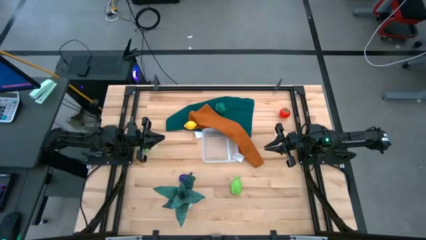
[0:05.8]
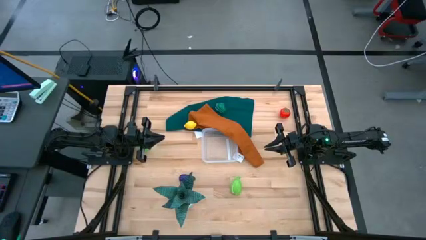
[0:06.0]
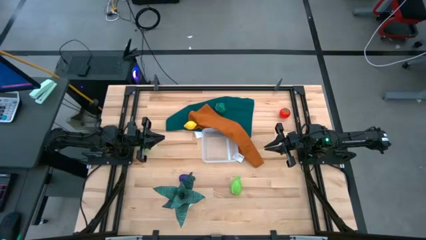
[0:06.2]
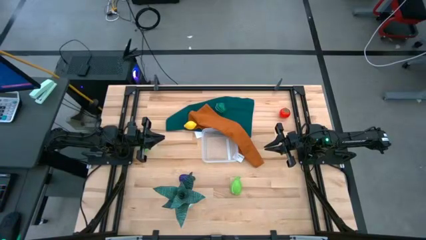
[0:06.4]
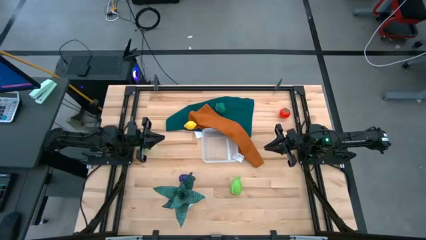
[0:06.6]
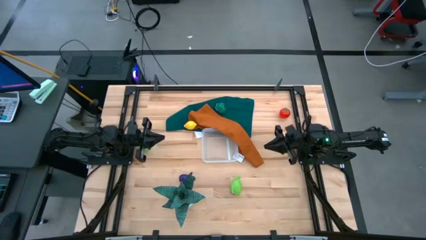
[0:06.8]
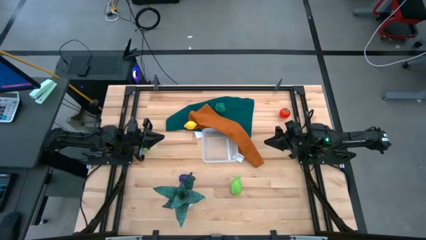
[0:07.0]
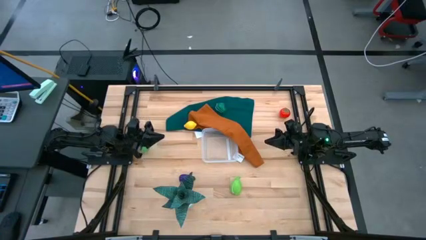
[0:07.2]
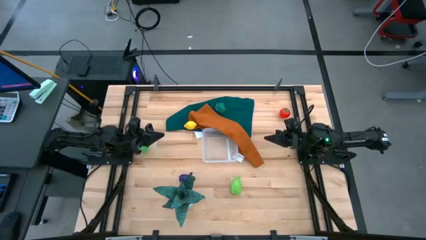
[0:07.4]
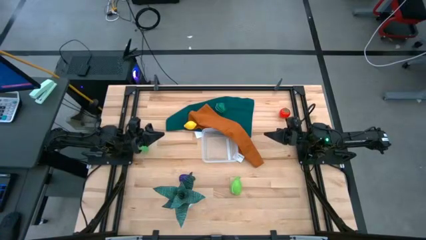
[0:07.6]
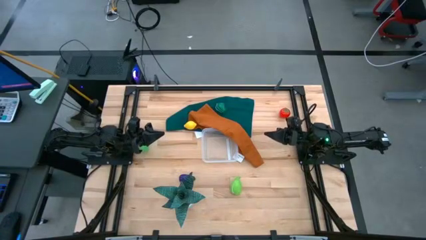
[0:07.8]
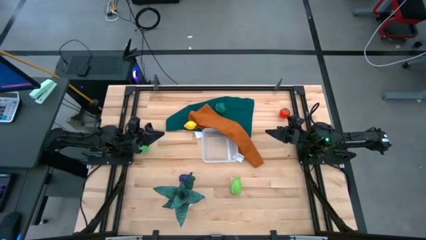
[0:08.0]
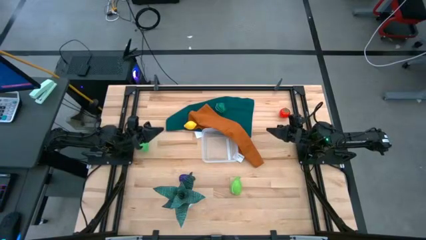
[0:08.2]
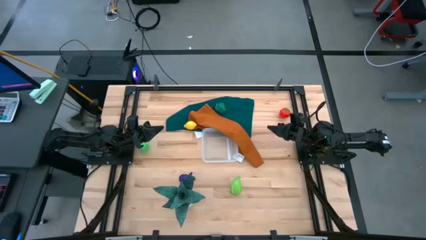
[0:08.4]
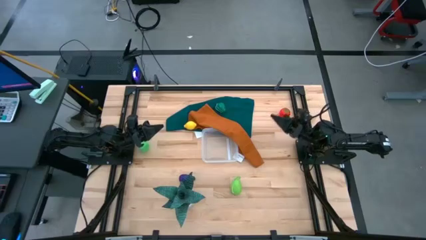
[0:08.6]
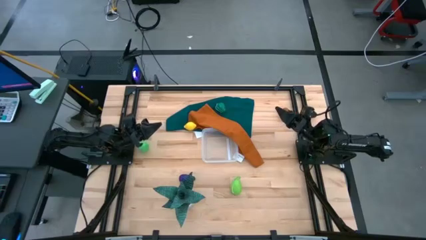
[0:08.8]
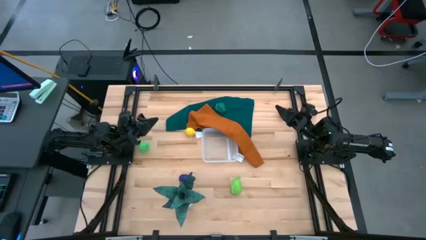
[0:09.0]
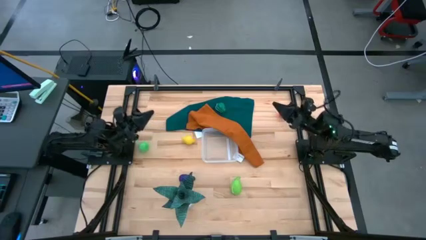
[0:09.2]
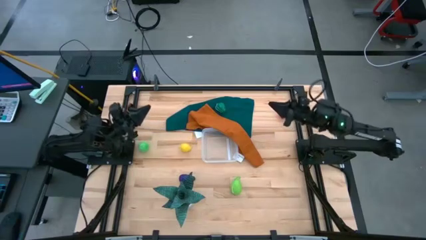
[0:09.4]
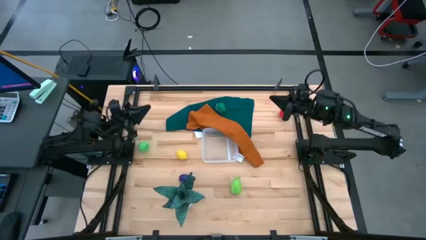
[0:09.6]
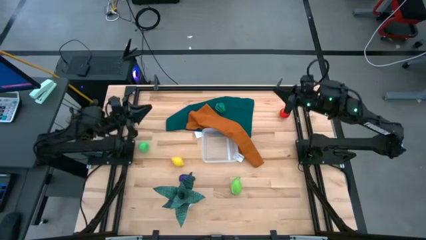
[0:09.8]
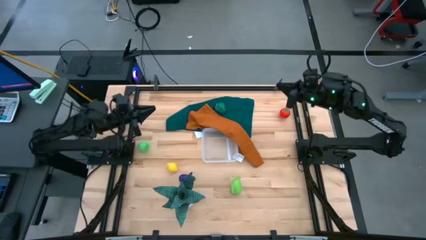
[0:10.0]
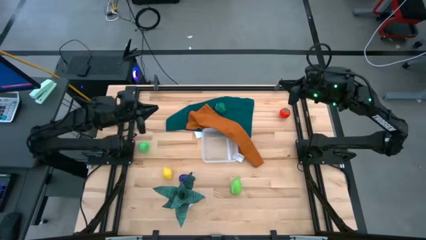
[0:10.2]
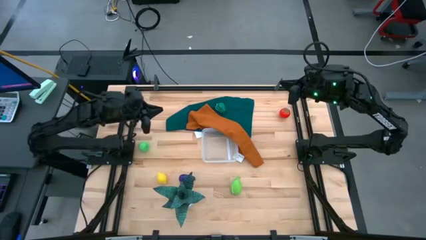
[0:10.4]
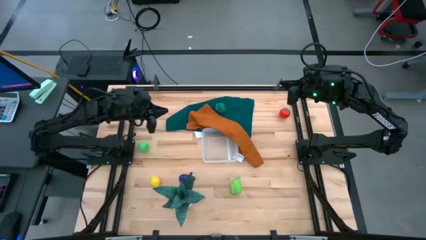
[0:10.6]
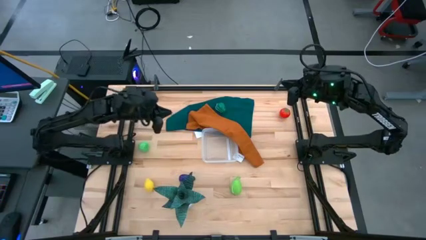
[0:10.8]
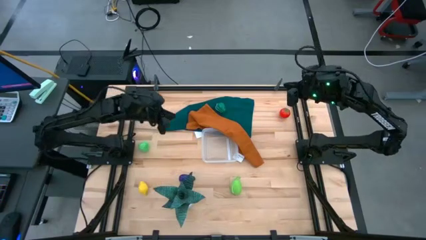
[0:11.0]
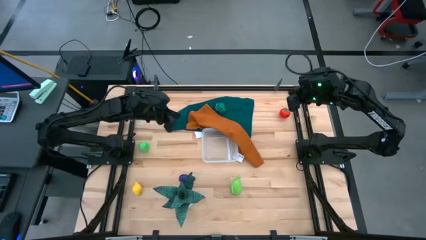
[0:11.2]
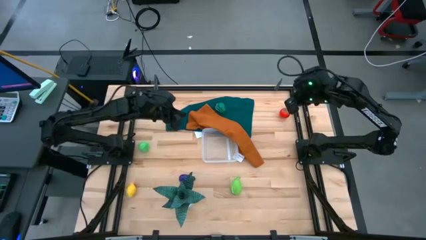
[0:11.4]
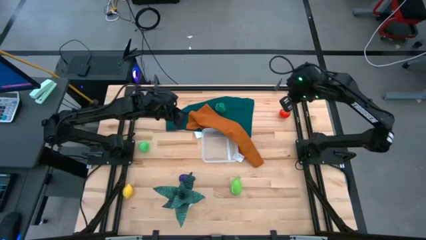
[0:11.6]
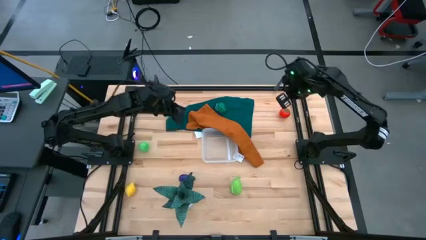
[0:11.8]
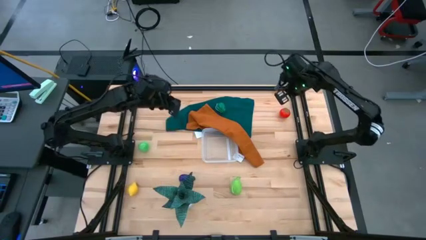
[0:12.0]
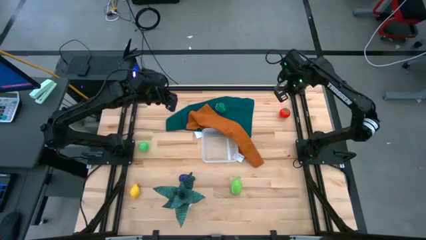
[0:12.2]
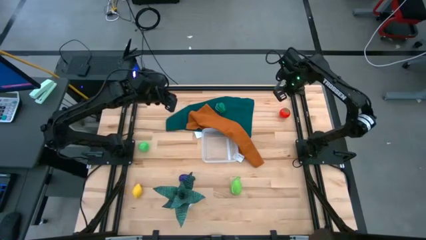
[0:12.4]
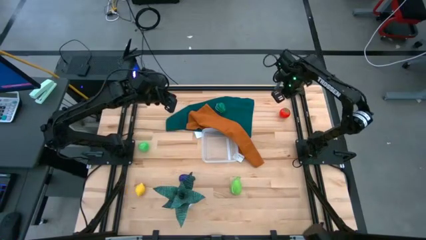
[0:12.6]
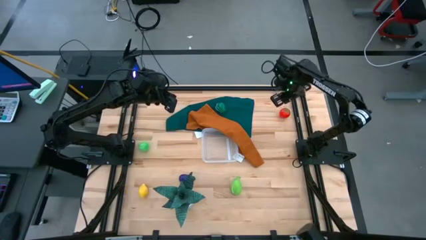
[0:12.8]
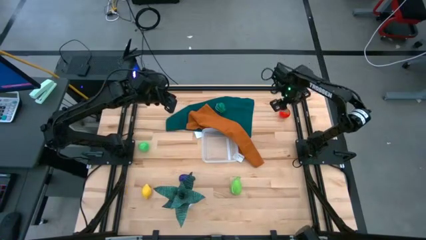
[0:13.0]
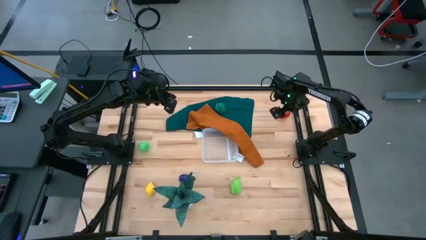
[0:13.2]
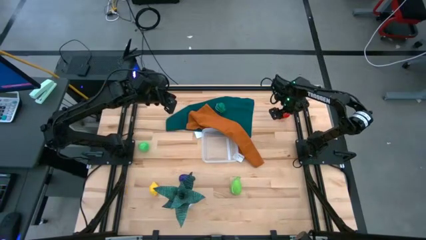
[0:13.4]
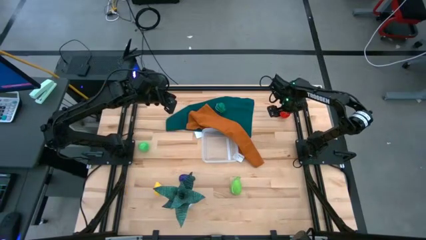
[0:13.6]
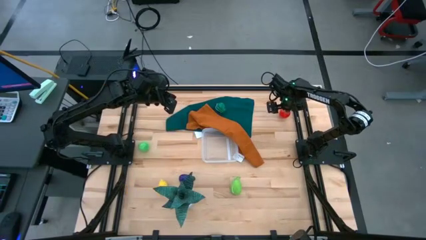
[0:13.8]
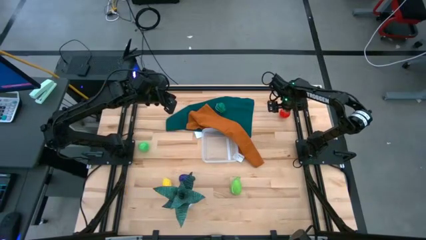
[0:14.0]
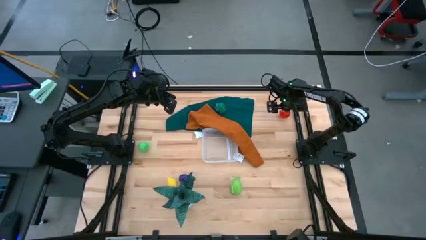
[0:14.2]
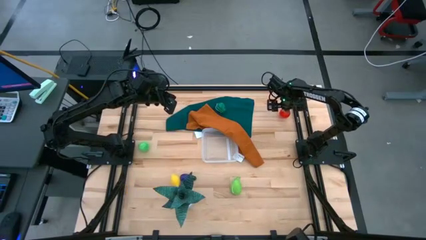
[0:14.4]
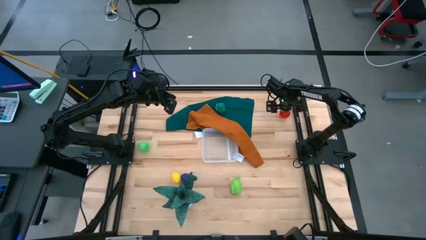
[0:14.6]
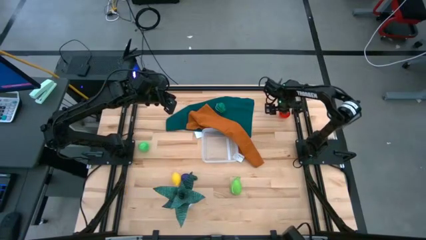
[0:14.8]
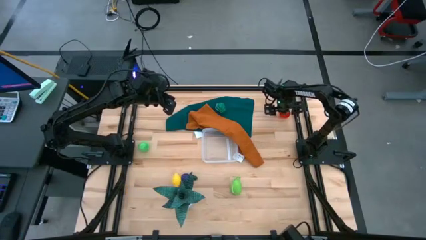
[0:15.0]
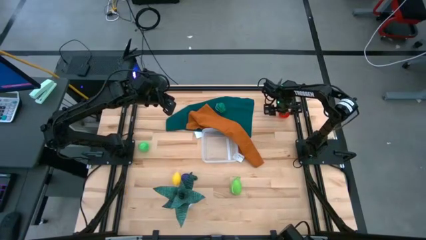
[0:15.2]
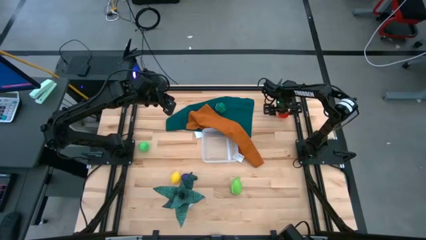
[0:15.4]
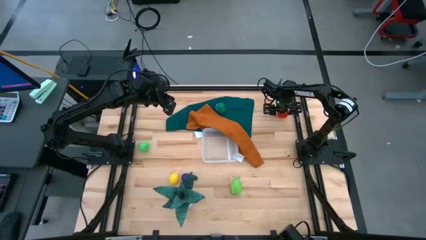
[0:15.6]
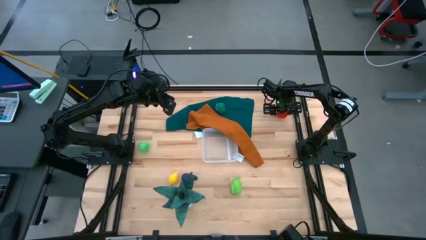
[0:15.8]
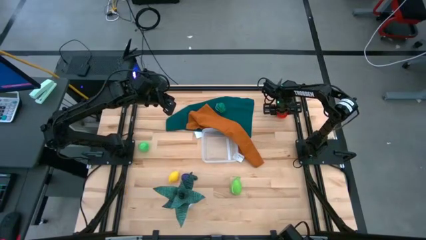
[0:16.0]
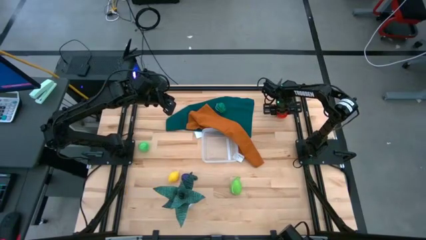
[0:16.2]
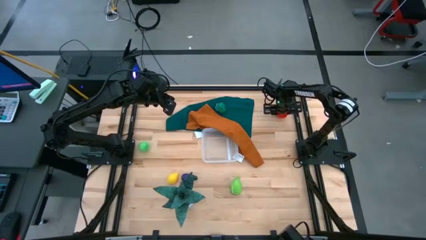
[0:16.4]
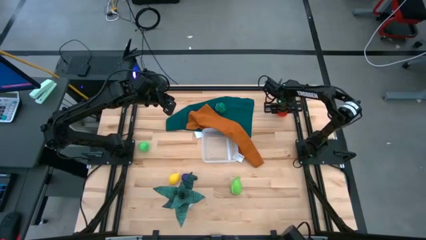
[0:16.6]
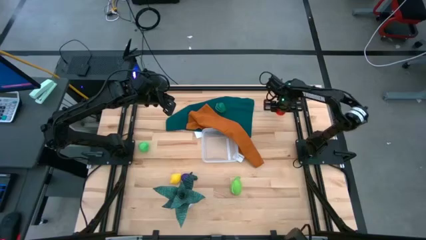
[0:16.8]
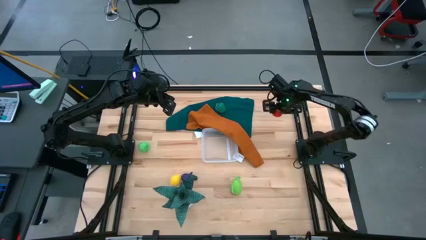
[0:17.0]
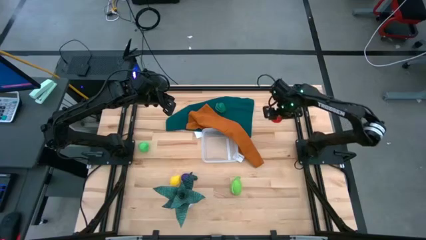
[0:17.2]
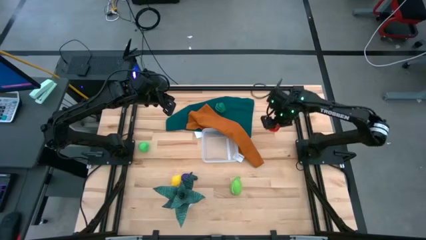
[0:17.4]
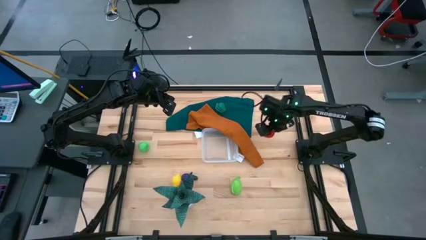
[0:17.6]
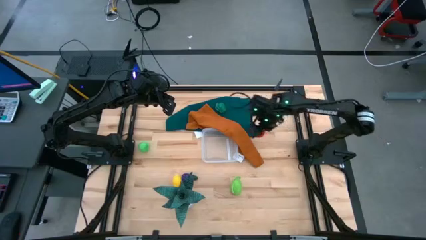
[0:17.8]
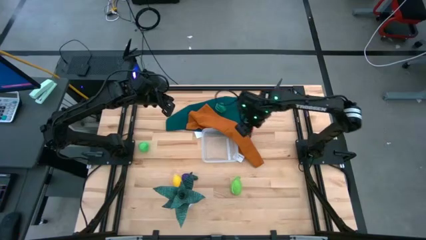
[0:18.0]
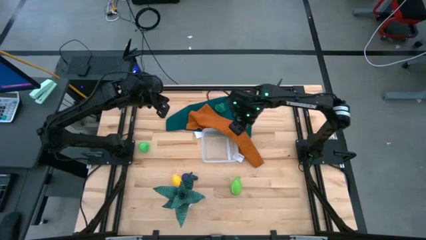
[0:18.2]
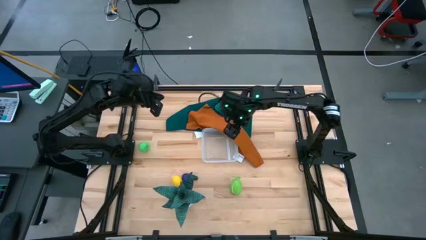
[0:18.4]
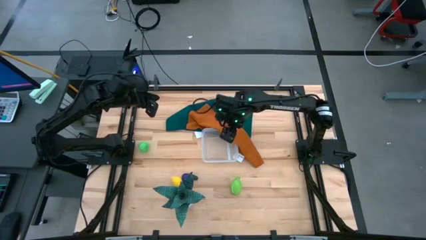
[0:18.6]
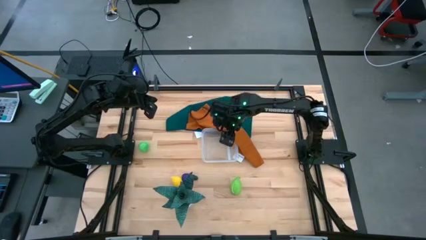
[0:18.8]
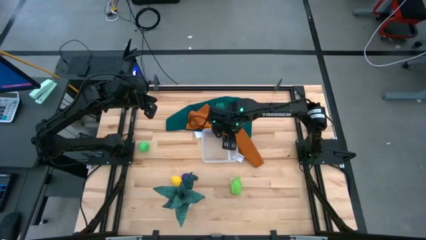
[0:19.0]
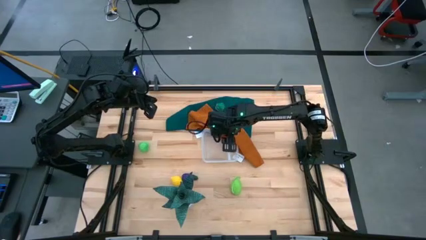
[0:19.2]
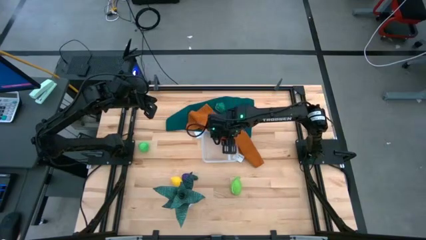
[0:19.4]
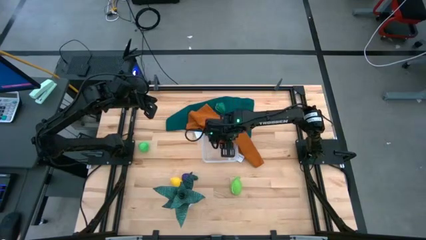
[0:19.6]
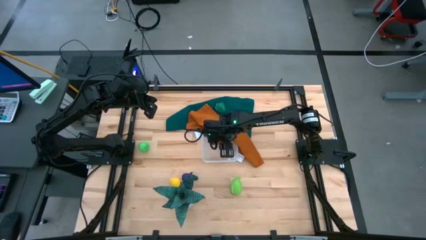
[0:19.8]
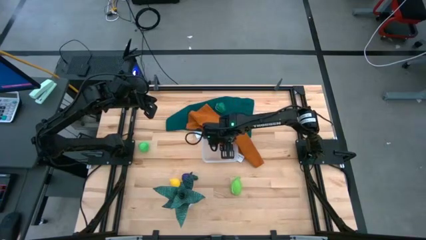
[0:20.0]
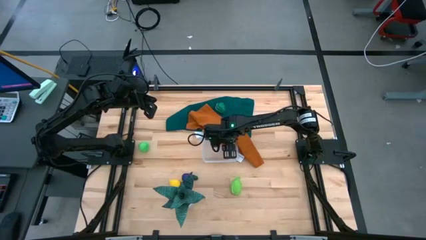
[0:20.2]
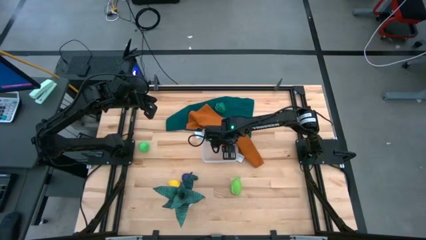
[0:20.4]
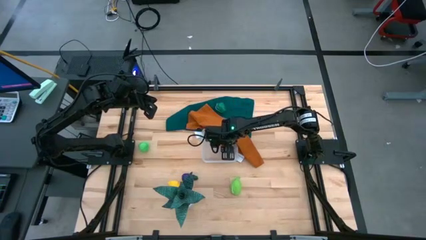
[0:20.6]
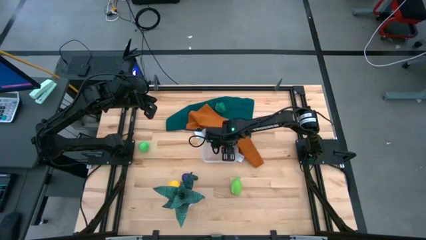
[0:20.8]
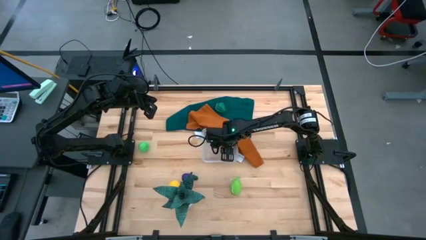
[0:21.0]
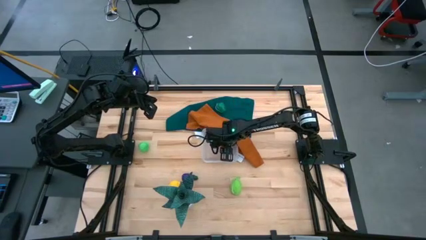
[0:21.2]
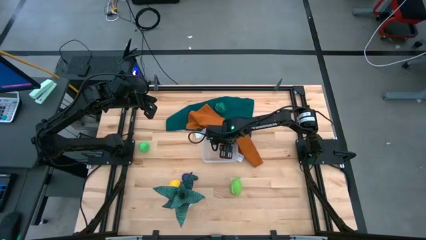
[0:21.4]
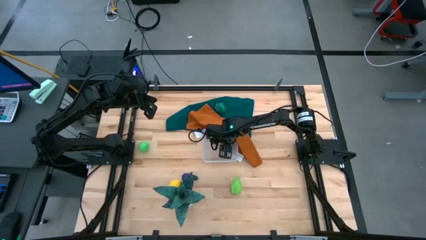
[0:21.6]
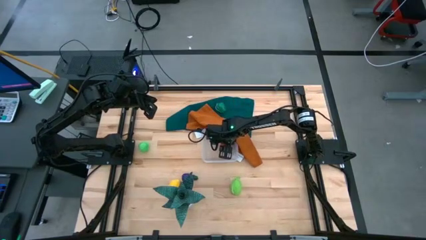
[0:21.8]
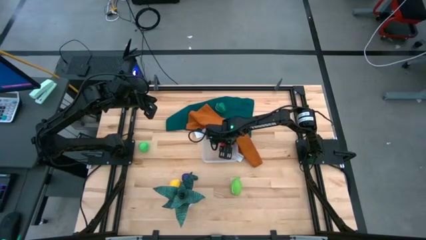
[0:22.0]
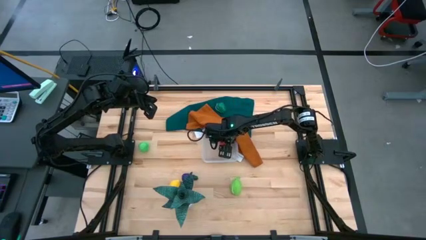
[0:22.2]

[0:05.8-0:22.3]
Task: Pick and placing Produce into tupperware
Put the tomato into the transparent bin
